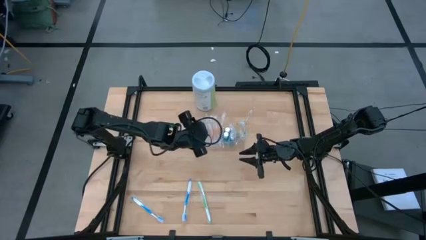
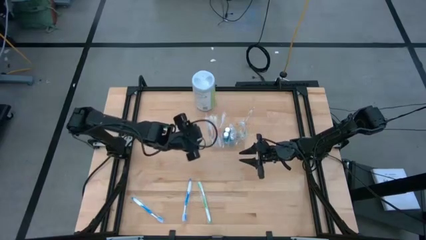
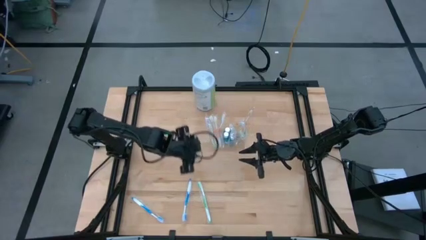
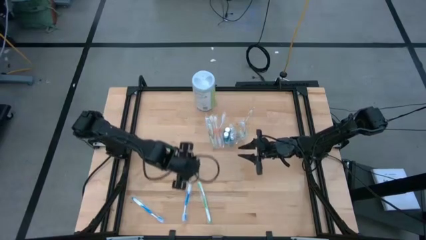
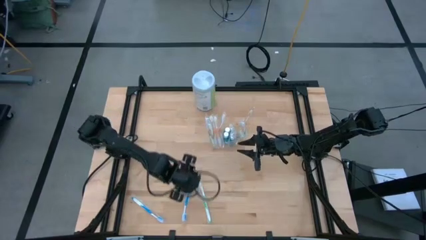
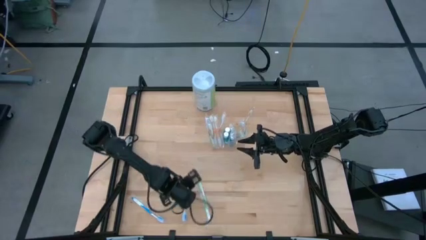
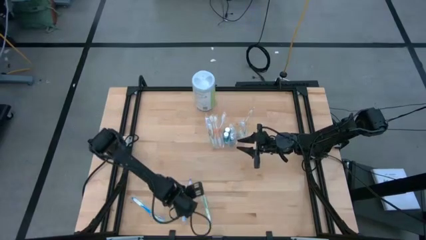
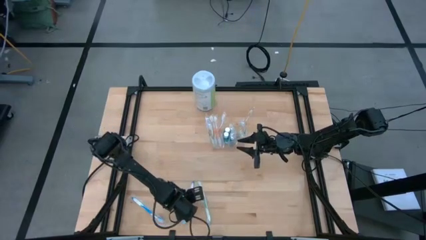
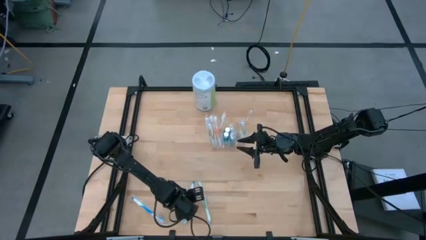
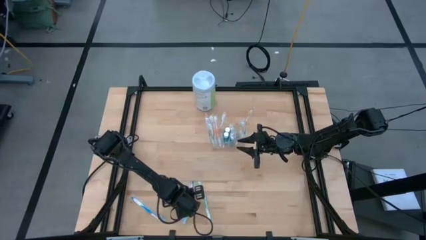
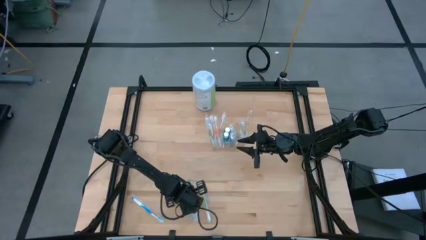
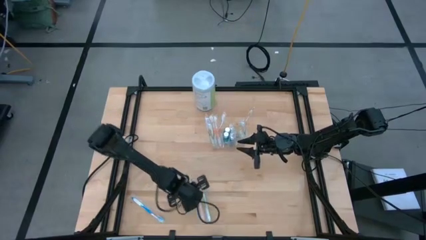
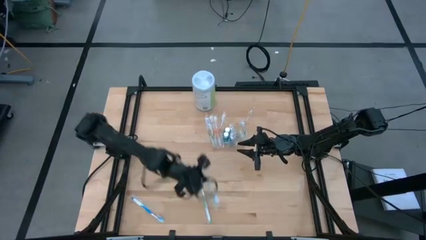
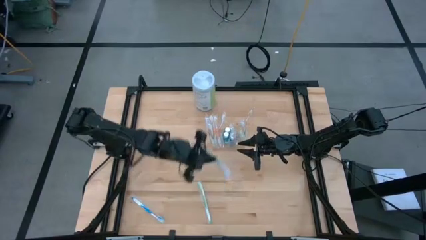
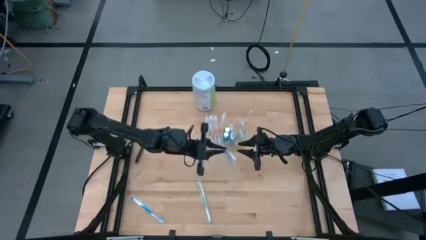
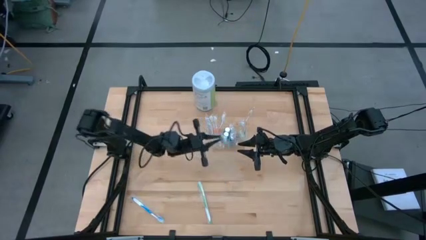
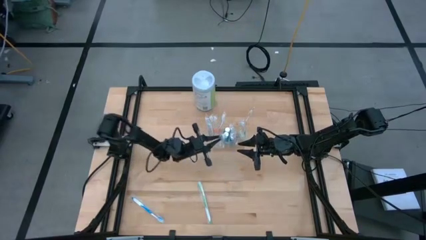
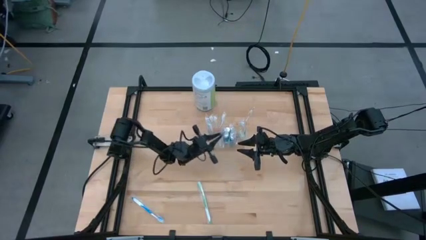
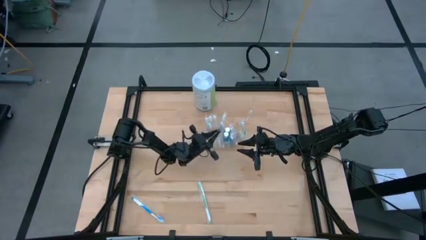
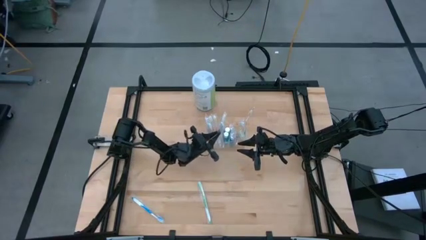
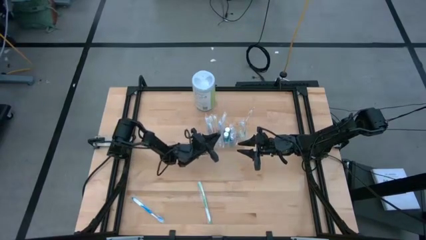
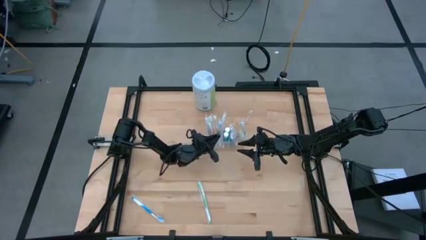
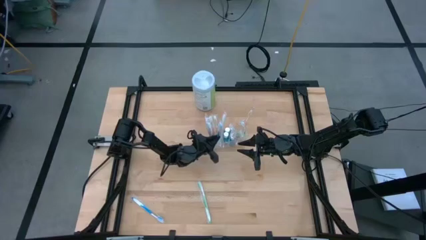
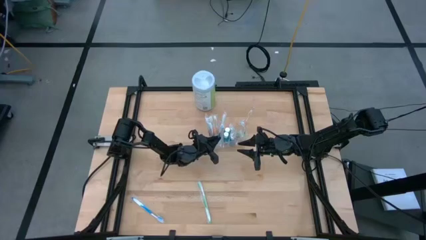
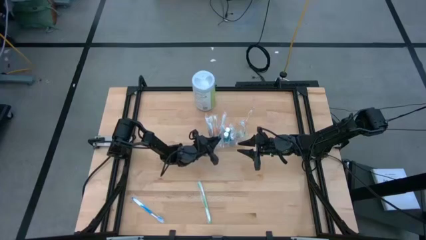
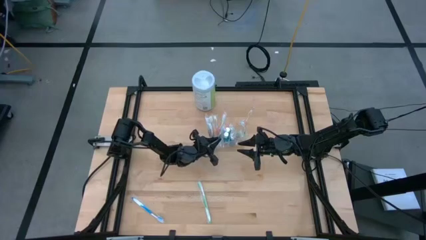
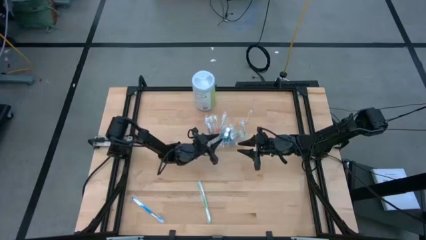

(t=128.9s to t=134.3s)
Task: Pick & Place toothbrushing station
Put the blue toothbrush into the transparent organizer

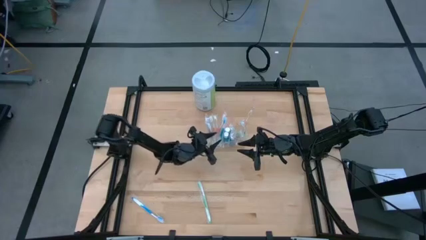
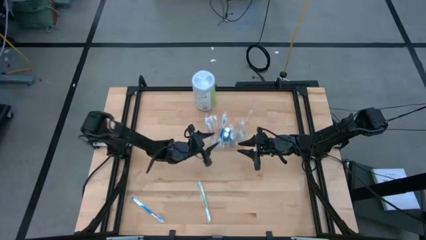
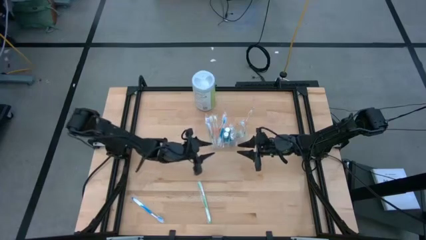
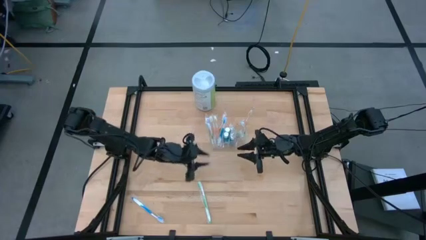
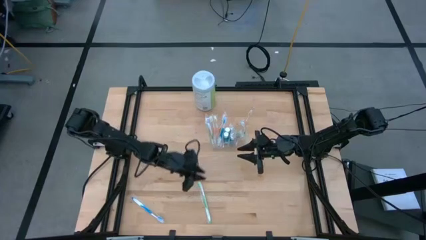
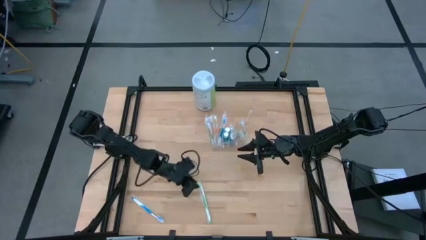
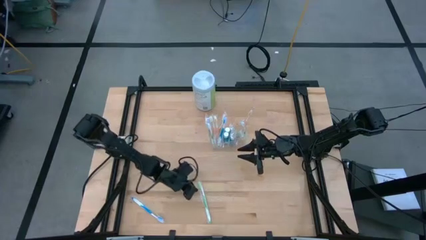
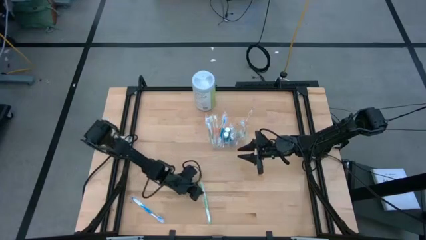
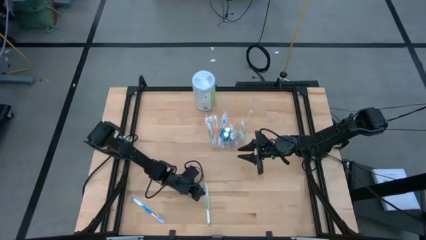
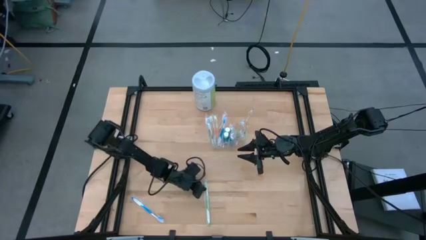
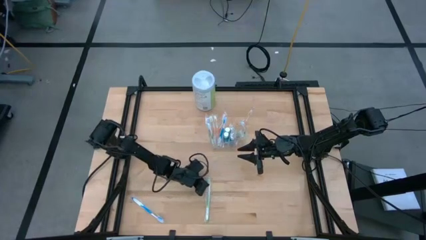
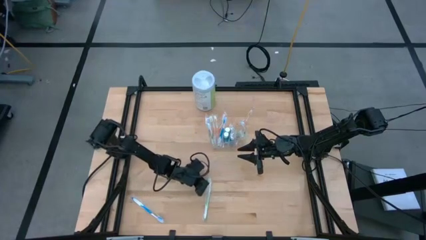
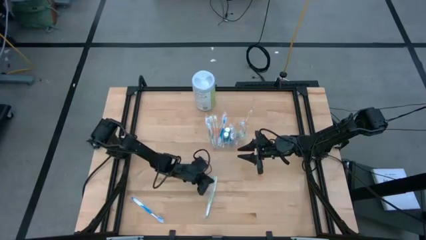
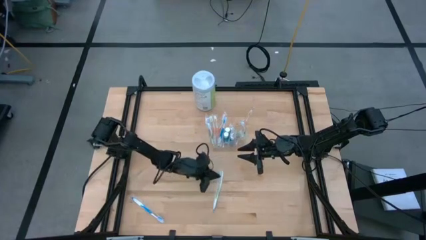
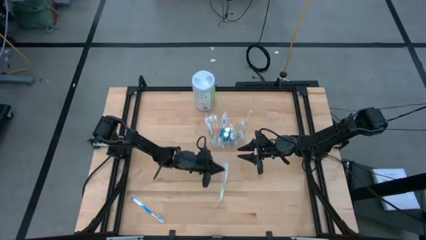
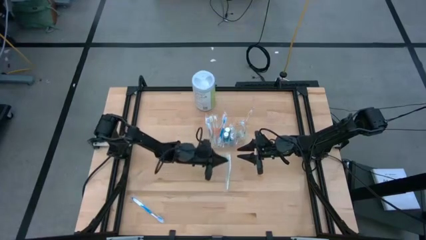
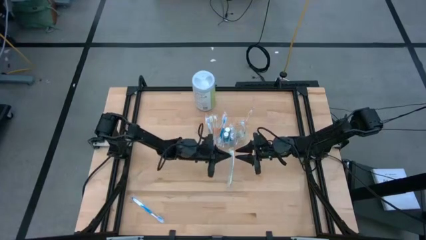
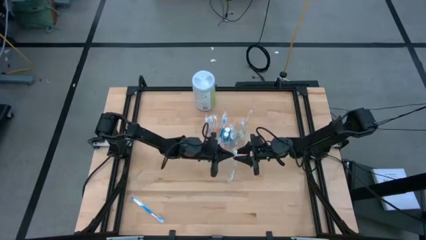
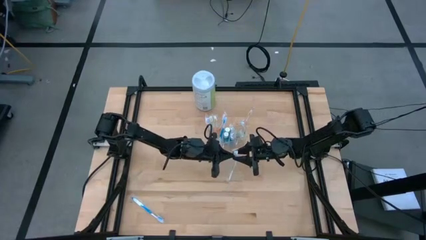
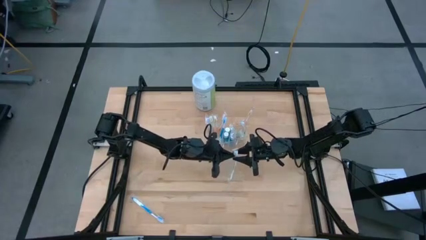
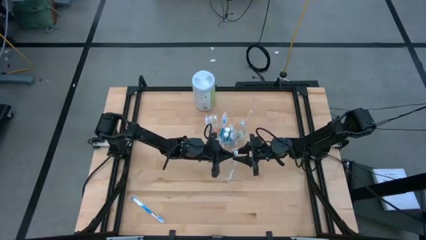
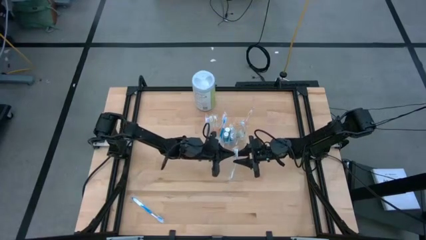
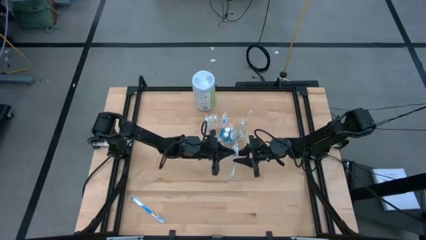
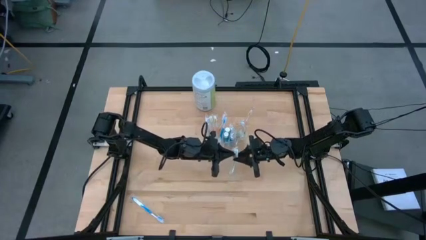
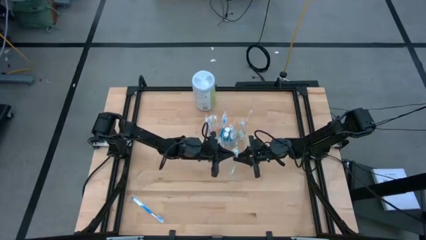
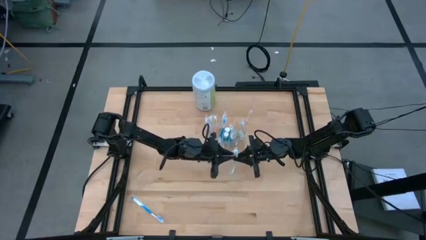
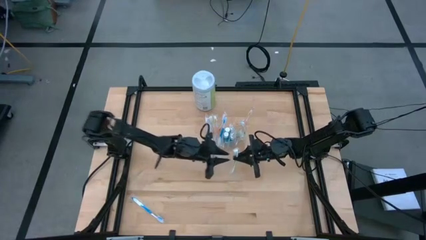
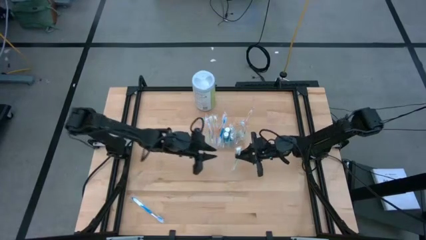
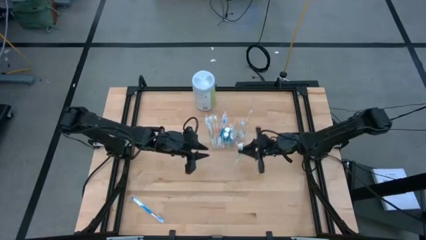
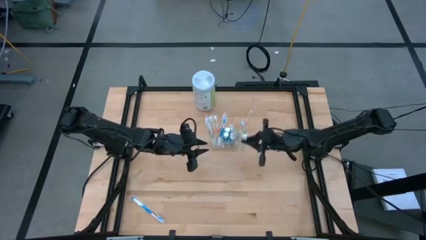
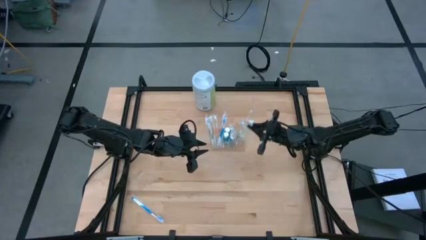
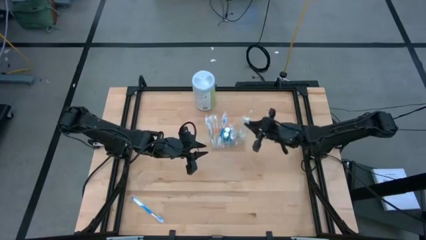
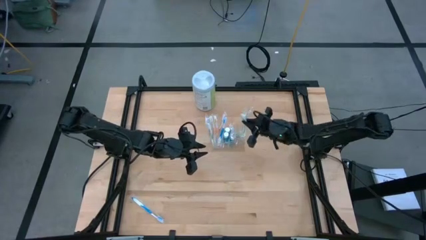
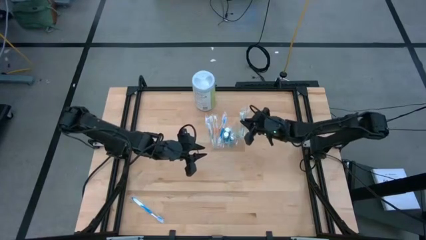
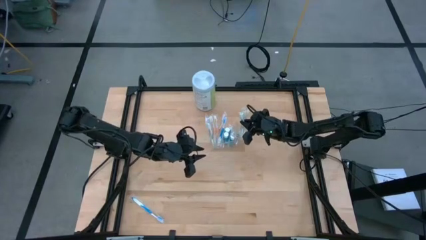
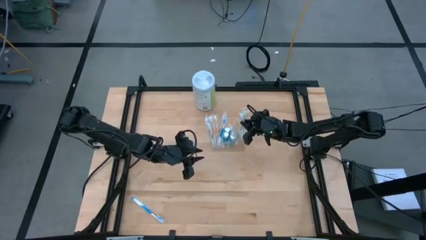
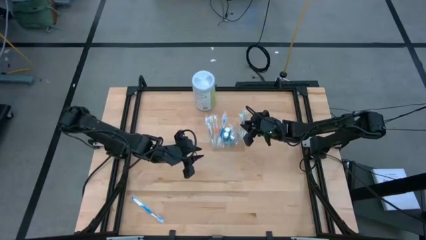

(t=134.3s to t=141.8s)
Put the green toothbrush into the transparent organizer

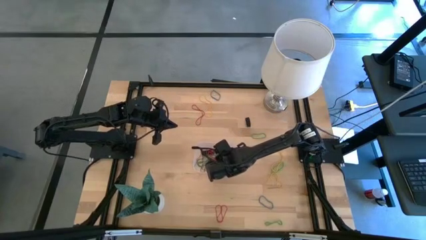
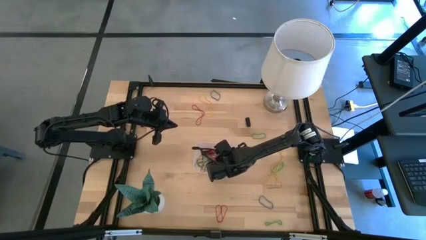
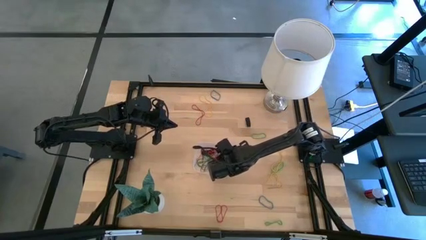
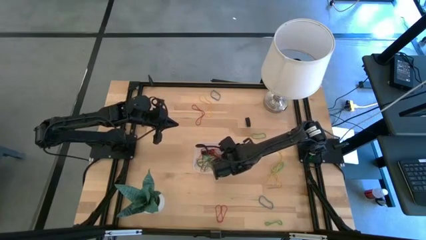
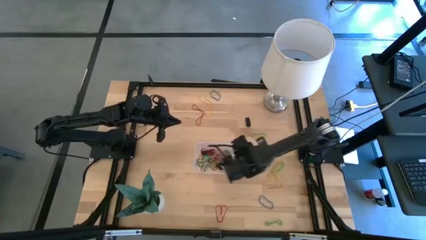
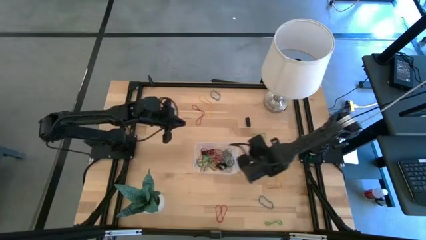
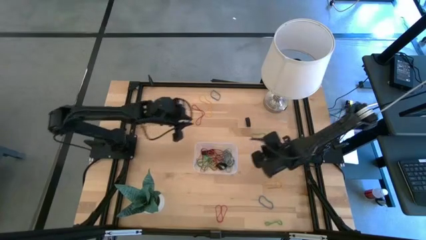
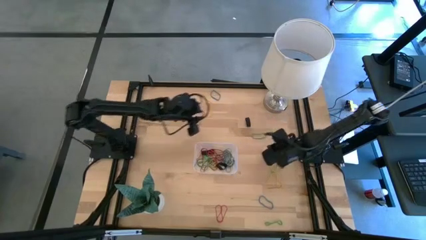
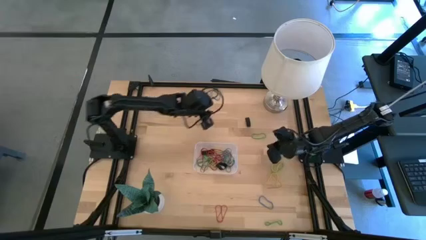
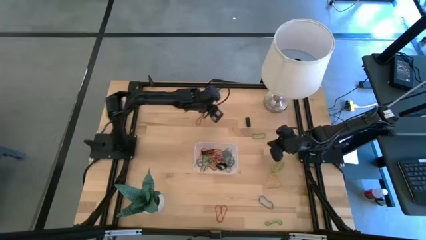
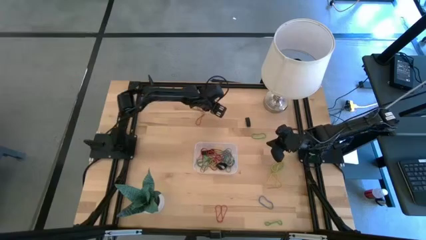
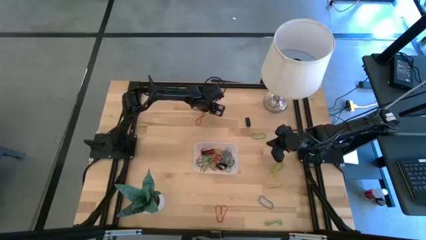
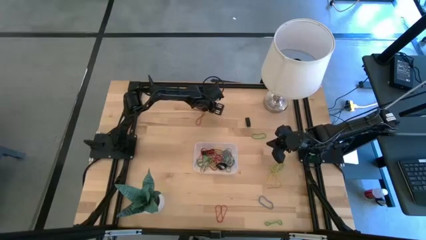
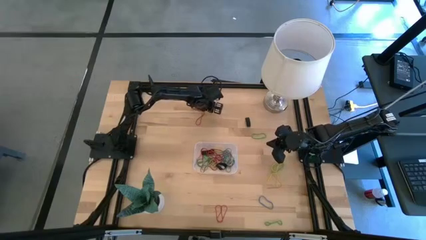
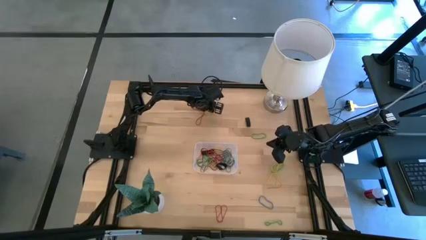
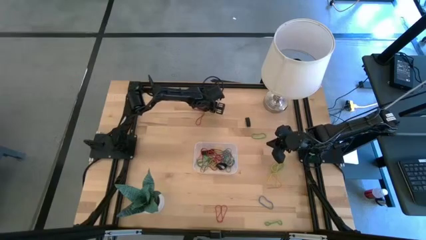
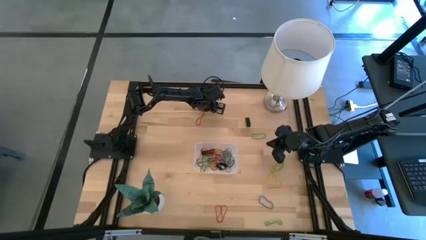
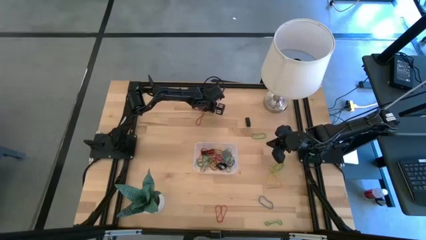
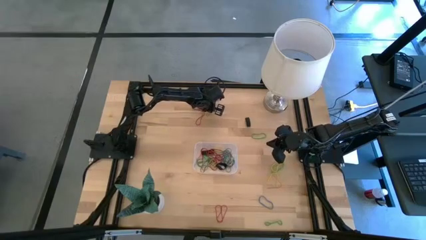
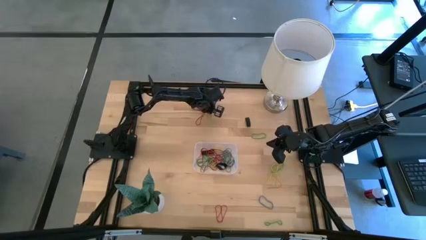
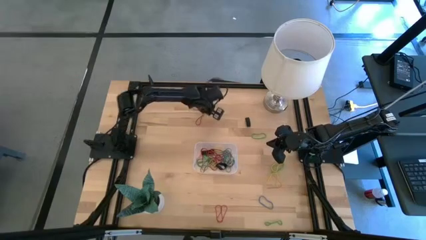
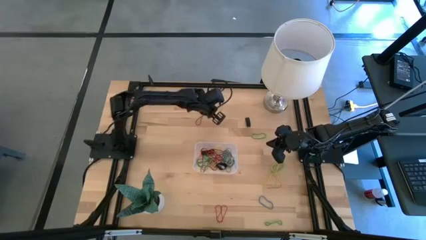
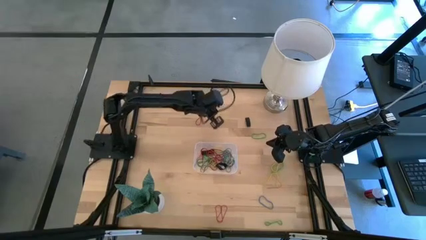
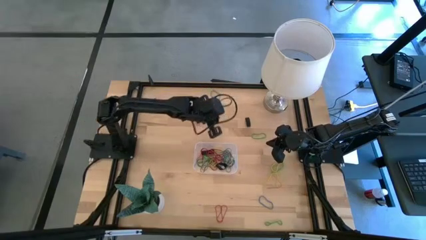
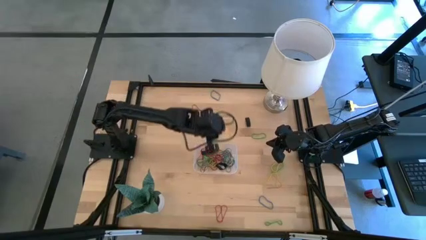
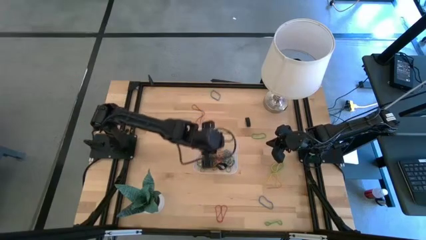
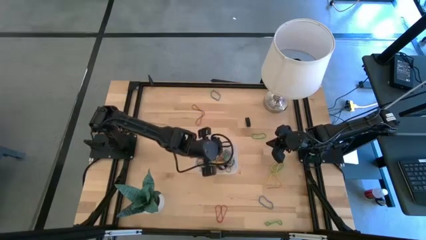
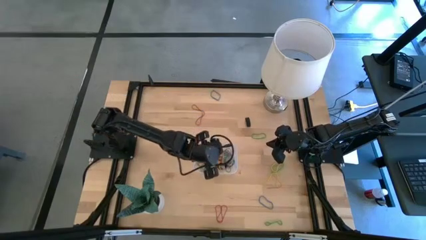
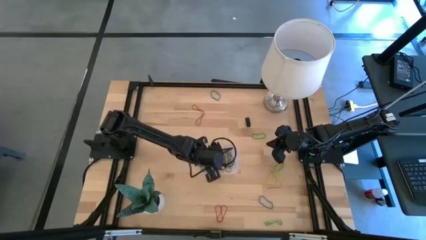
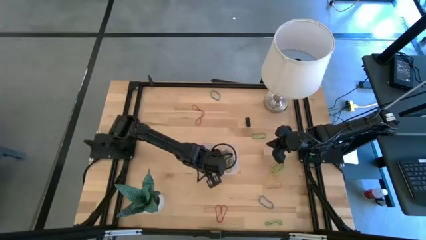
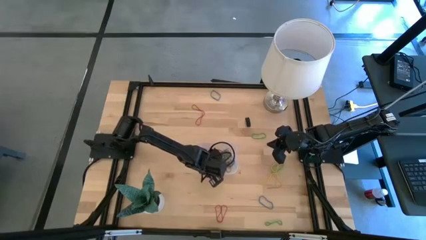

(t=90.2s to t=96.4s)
Task: Pick and place rubber bands into bin
Put the yellow rubber band into the transparent bin
